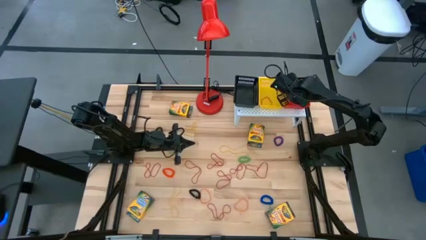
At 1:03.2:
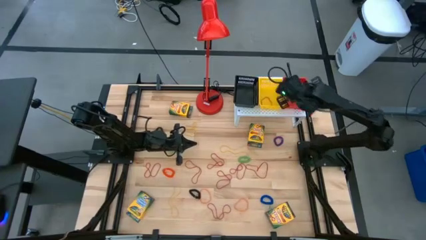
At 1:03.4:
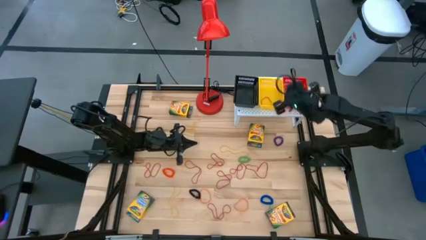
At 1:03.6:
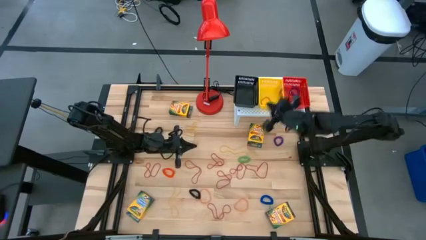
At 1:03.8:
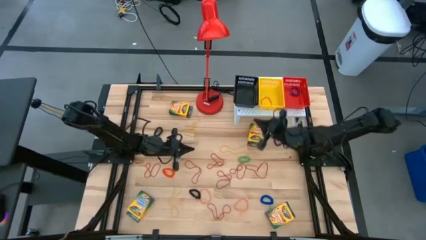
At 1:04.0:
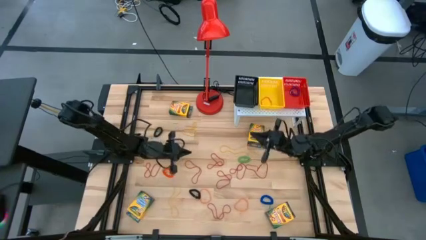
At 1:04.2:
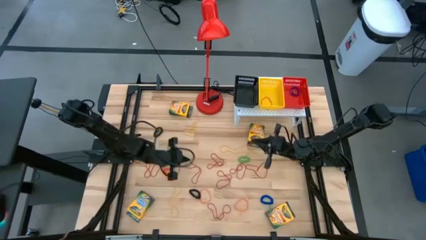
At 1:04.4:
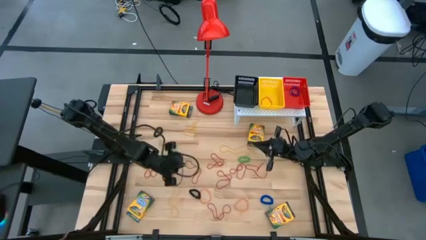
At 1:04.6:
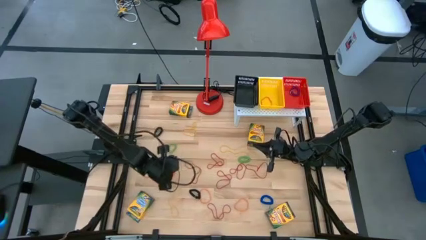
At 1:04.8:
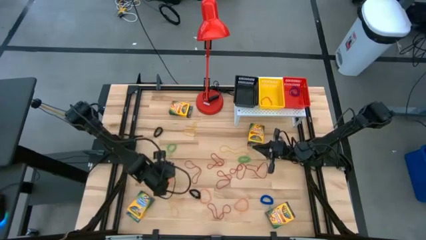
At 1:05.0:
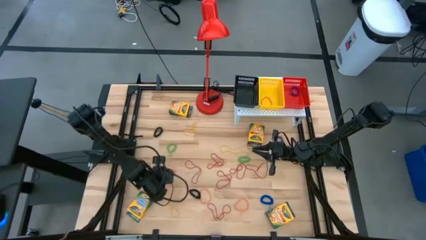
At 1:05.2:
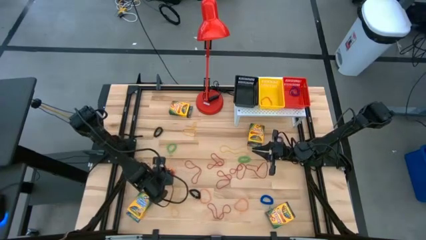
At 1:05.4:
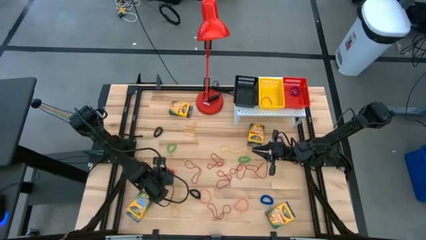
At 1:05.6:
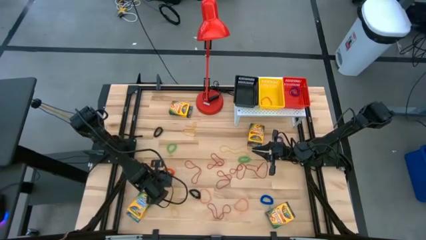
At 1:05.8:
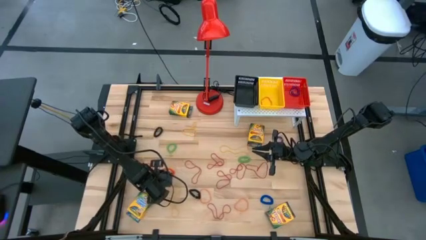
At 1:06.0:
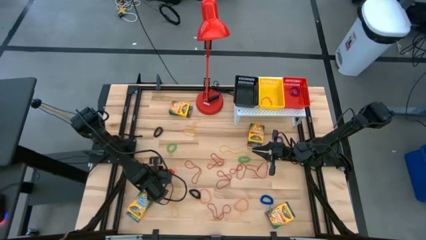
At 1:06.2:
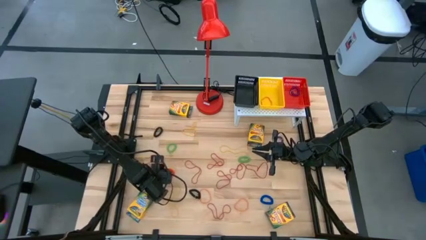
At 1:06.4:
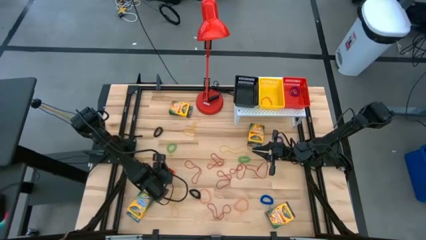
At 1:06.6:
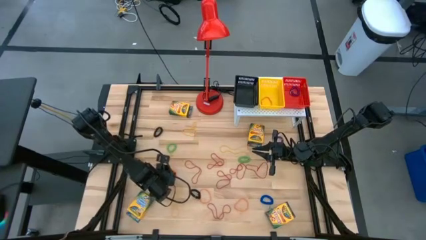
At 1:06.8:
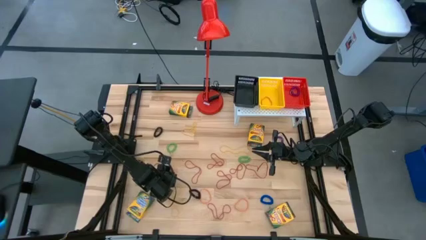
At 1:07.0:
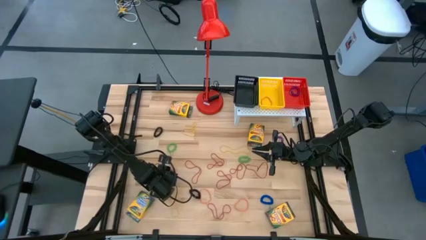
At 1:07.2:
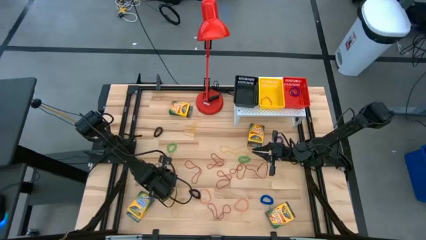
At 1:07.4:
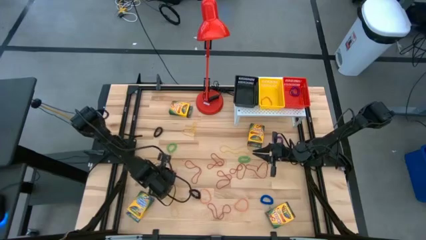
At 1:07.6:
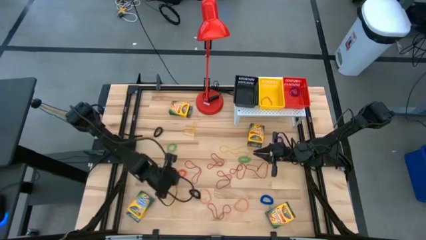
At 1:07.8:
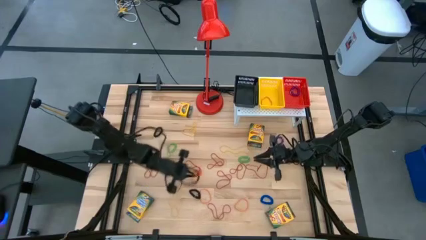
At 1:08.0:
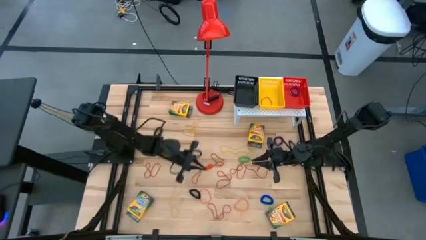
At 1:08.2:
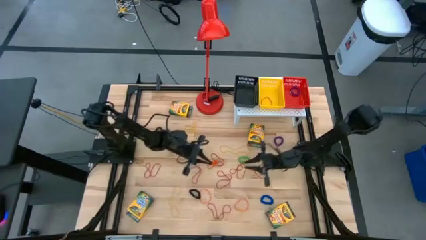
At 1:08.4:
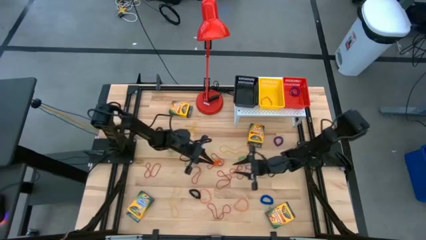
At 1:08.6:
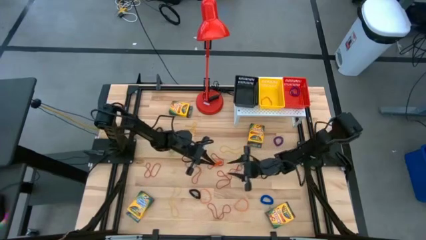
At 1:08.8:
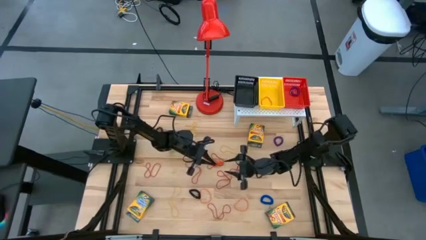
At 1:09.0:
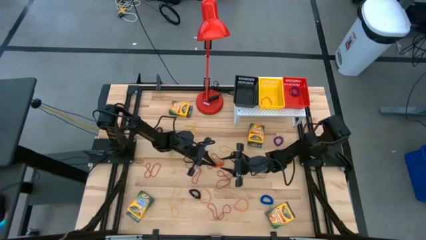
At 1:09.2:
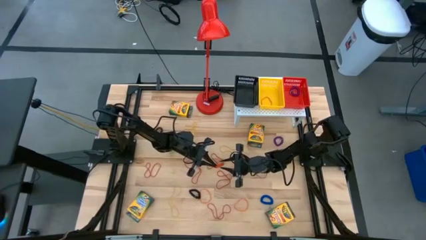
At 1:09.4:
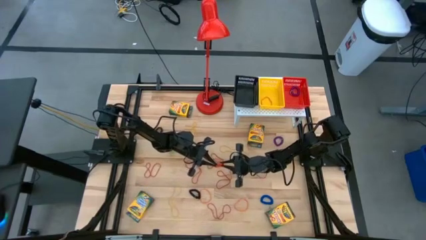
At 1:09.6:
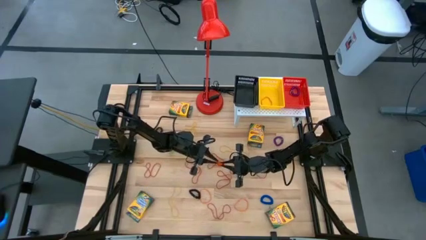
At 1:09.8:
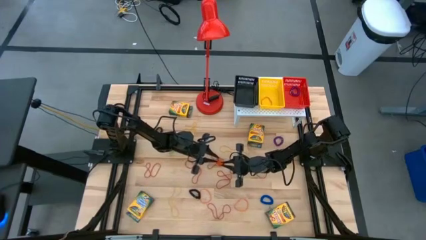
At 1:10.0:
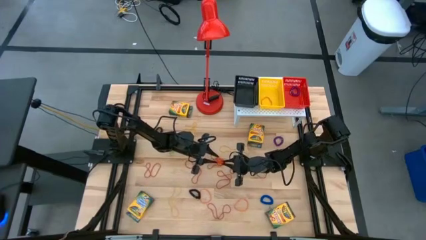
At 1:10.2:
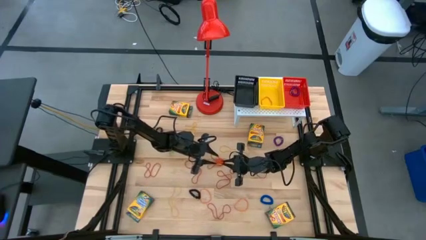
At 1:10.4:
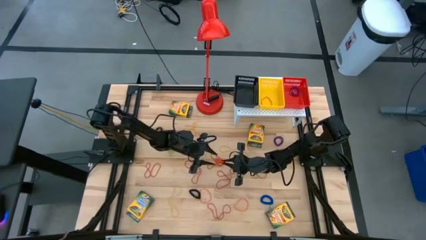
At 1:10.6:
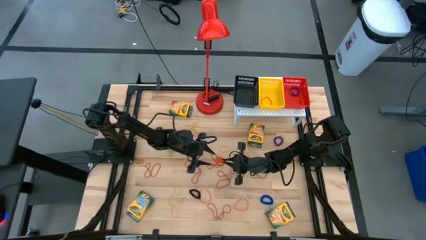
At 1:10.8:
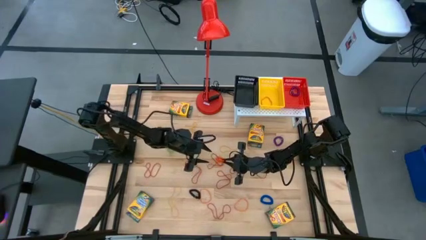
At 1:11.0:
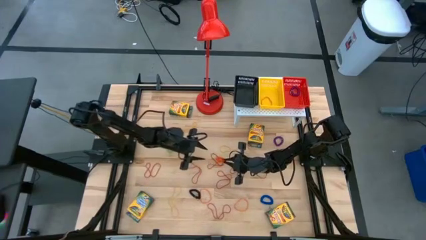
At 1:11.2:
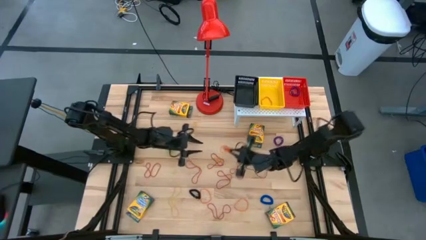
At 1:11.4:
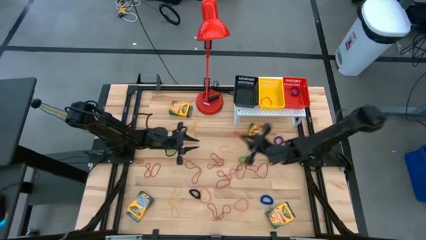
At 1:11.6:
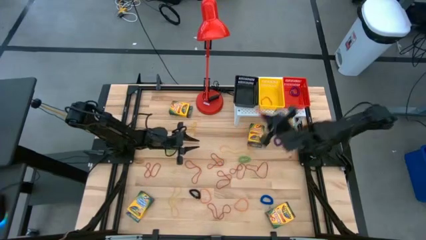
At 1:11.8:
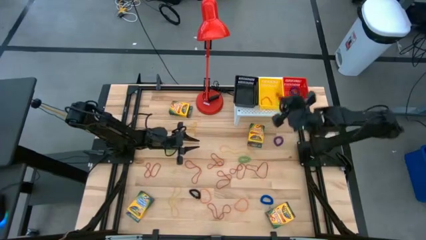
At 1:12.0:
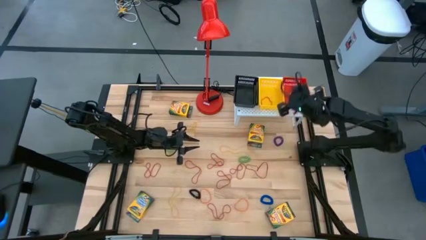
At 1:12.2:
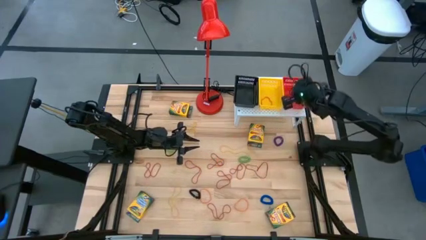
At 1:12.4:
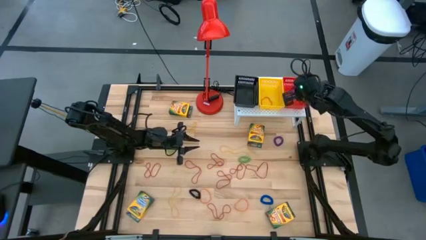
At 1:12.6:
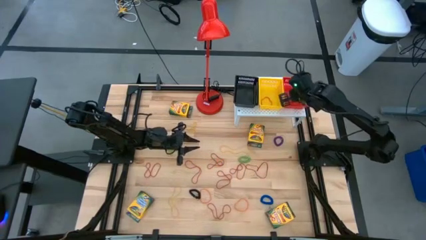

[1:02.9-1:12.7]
Task: Pick & Place Office Desk Supplies
Put the orange spring keychain into the red bin

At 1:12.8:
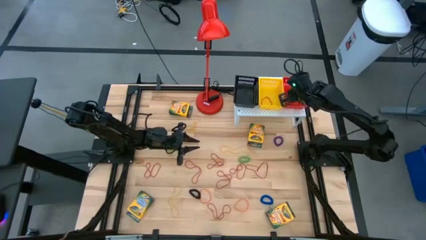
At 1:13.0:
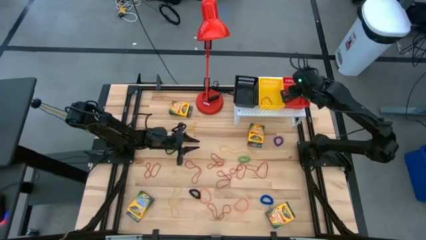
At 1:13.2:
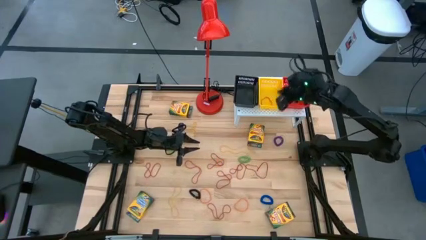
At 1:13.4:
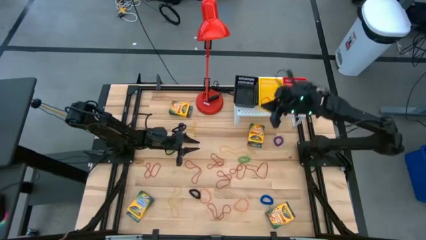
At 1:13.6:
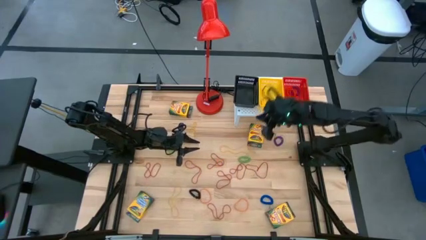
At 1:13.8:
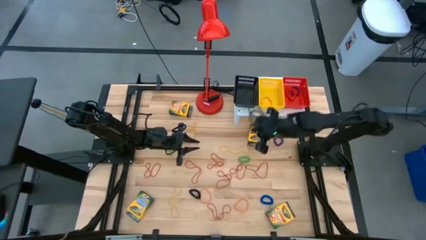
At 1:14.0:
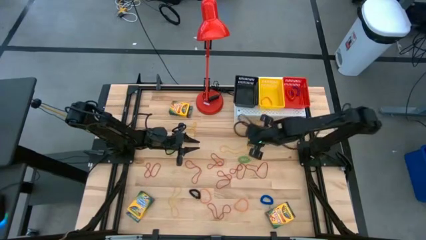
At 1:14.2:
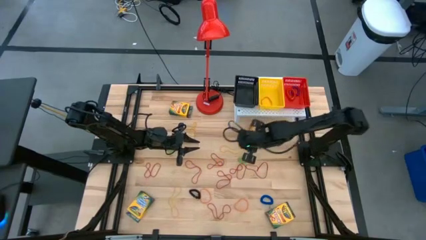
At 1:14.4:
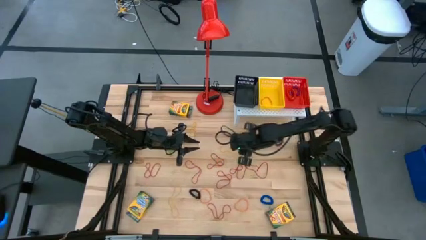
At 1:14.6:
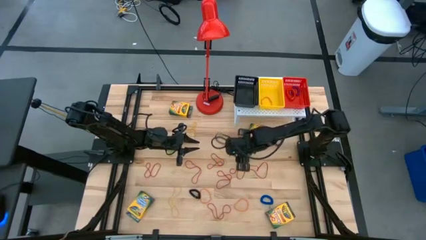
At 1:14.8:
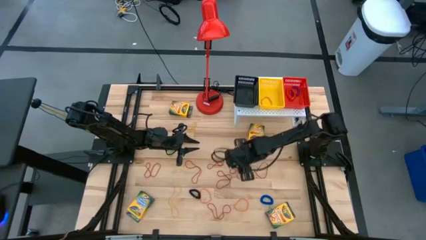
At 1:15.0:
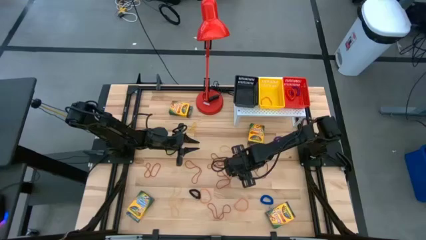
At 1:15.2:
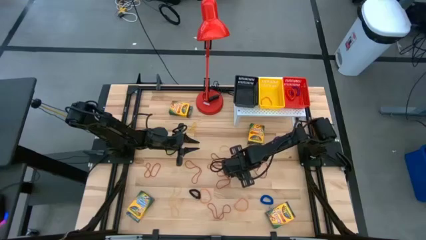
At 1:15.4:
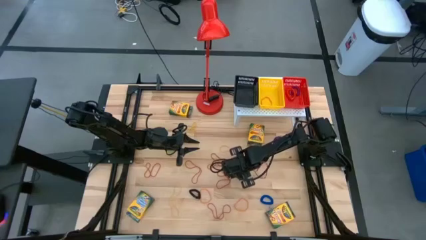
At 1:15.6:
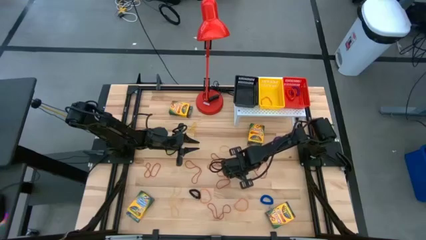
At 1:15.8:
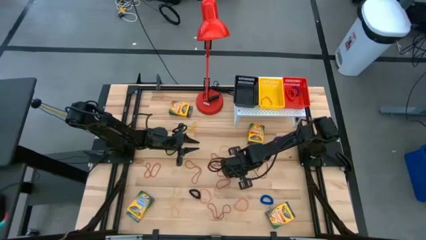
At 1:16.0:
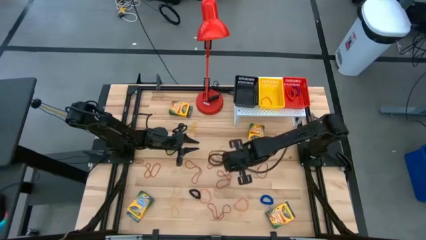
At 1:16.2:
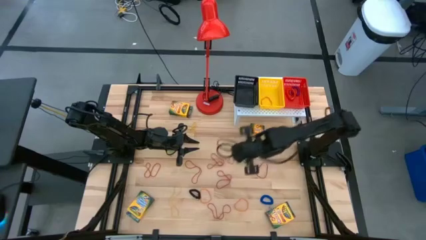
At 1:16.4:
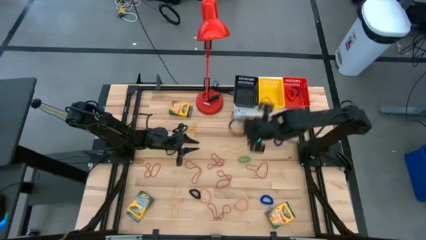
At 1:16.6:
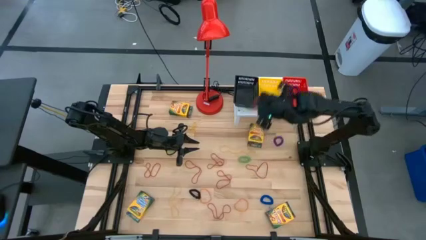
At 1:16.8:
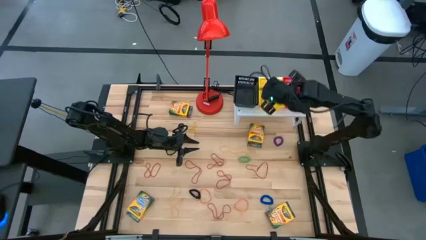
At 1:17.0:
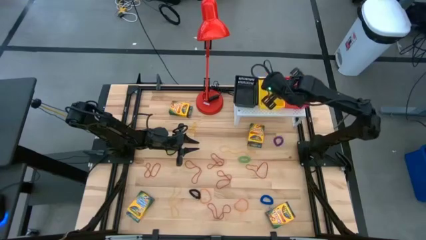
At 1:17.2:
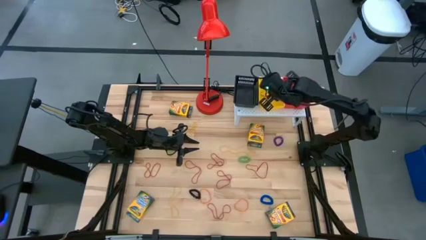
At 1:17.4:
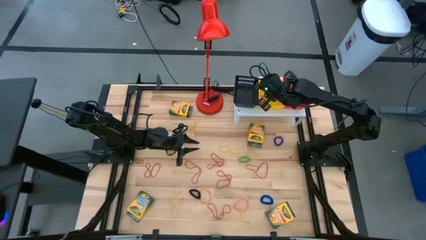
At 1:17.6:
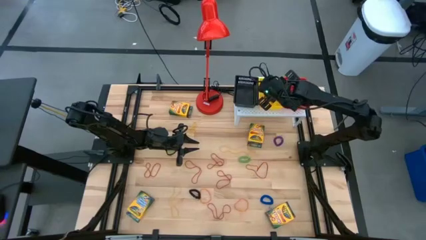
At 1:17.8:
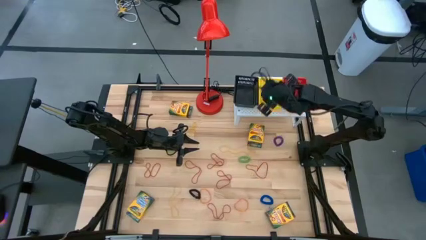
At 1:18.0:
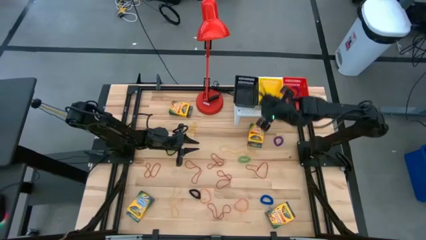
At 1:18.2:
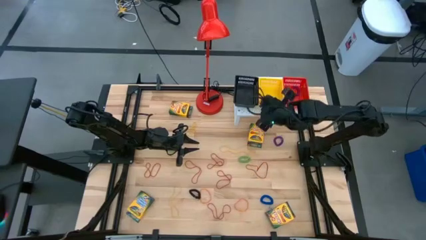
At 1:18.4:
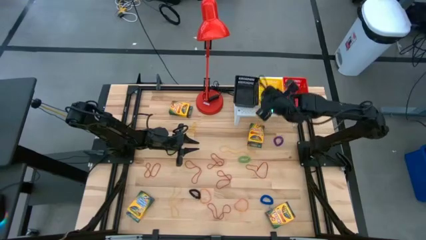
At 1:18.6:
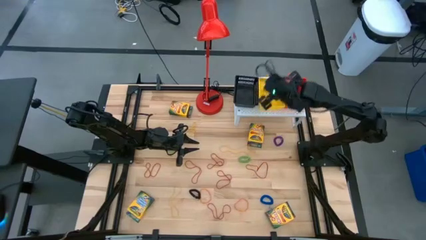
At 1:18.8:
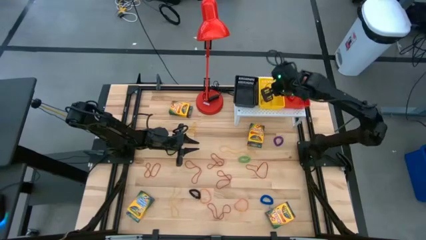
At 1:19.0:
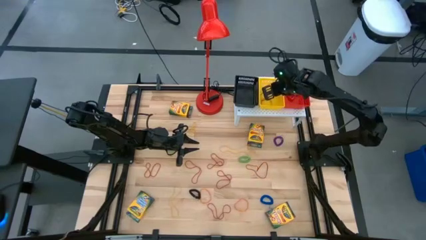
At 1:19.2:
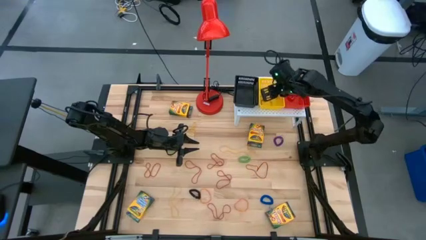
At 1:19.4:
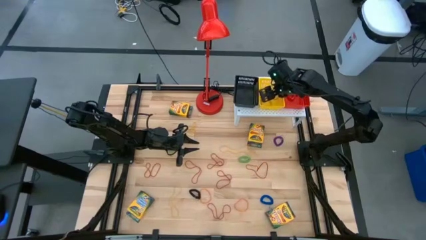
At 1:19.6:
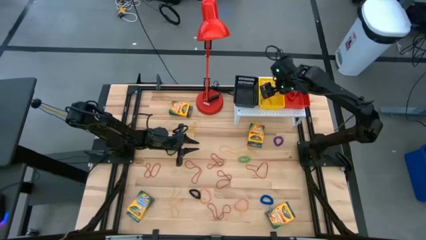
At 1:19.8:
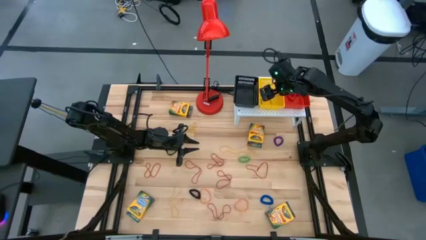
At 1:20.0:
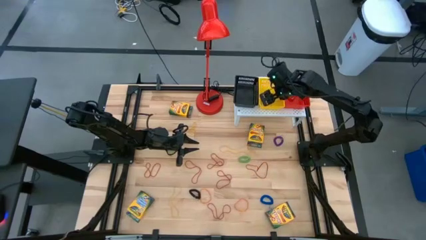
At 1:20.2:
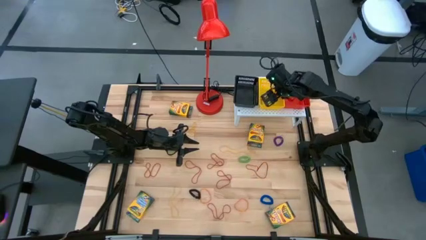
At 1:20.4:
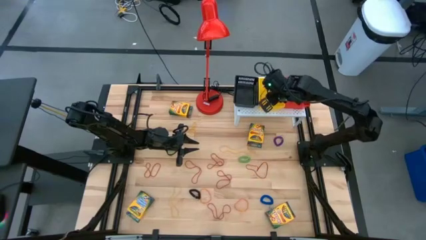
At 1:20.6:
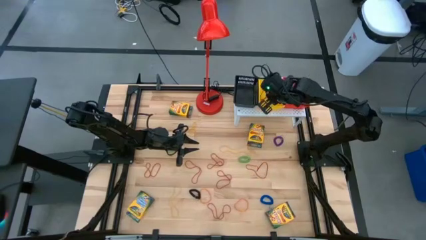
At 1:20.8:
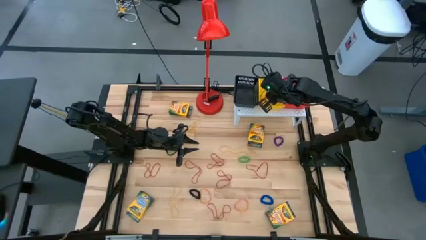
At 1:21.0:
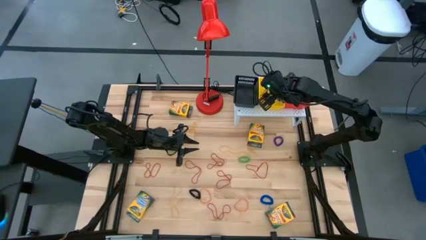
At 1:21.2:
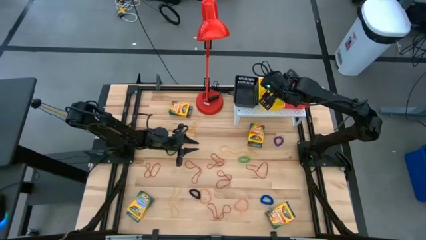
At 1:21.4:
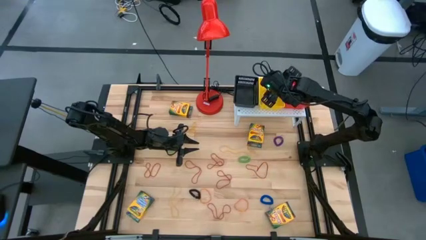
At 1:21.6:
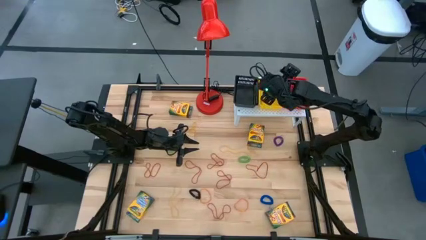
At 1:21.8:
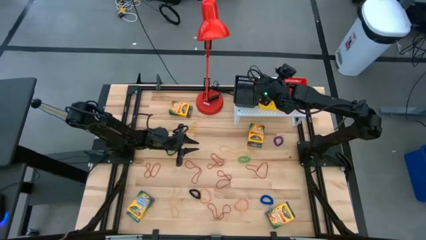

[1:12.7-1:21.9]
Put the red rubber band into the yellow bin
